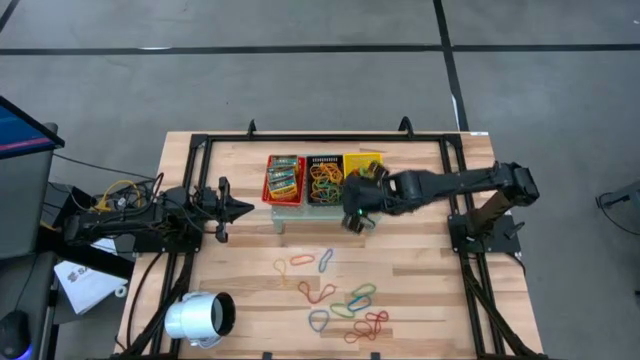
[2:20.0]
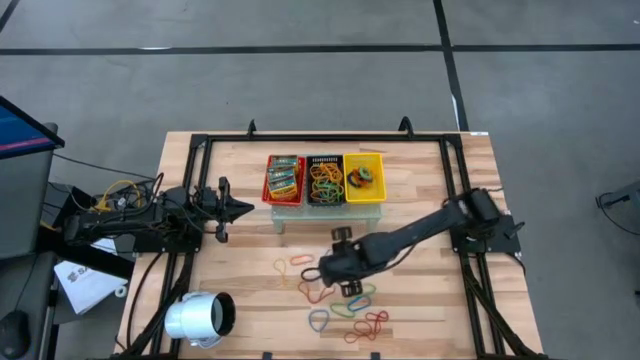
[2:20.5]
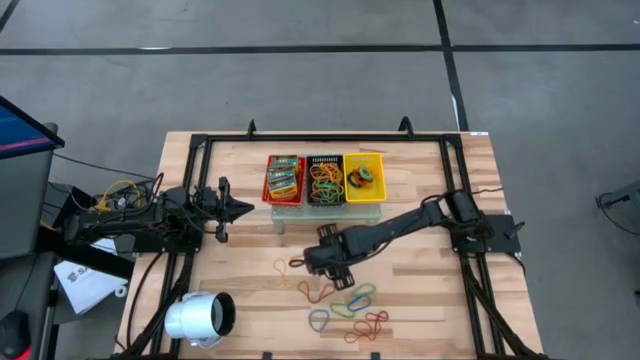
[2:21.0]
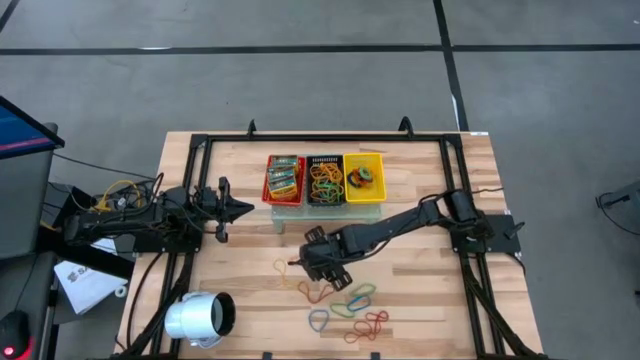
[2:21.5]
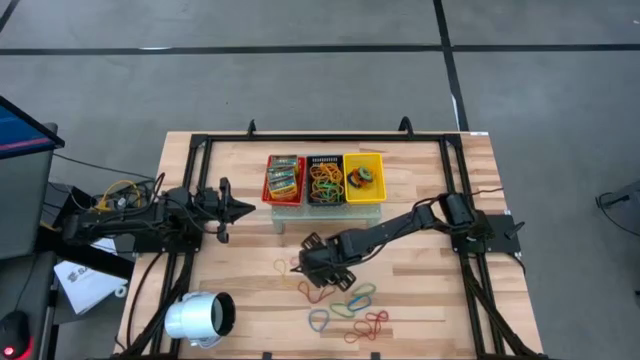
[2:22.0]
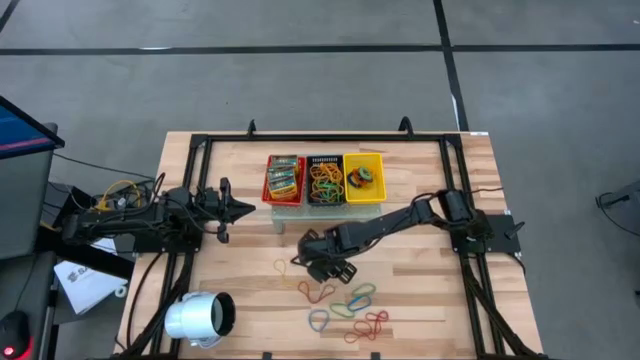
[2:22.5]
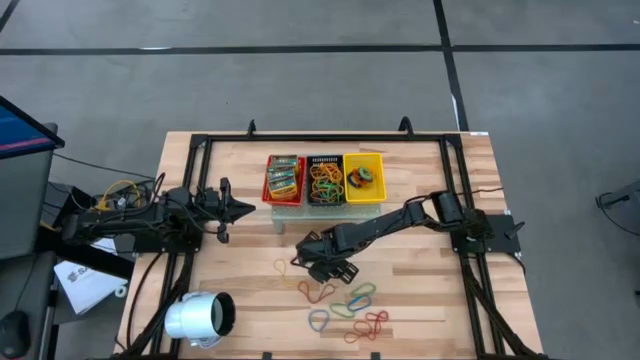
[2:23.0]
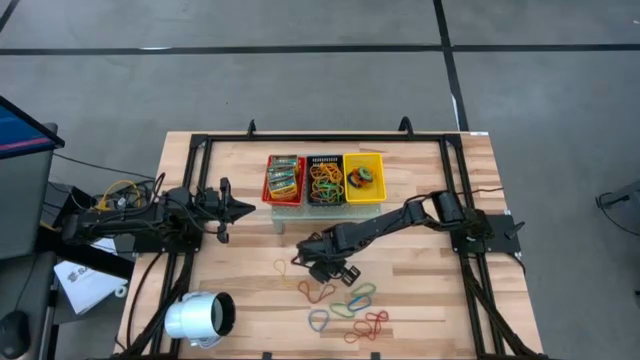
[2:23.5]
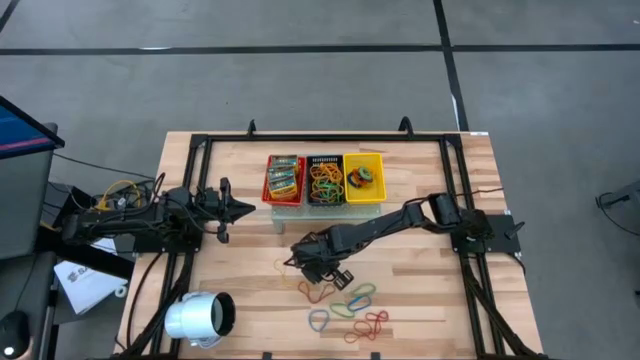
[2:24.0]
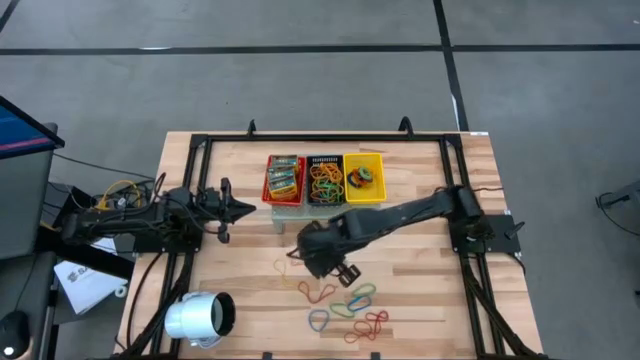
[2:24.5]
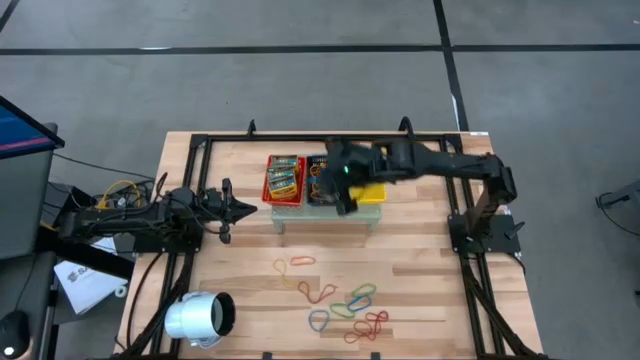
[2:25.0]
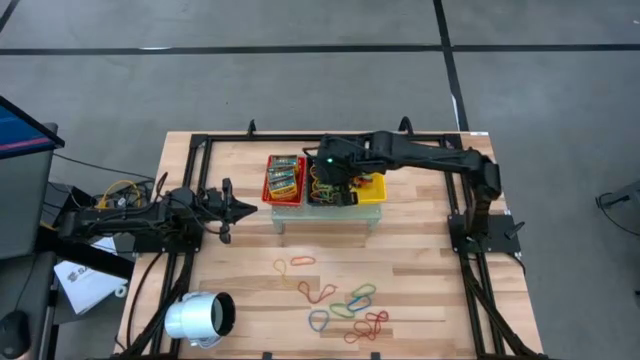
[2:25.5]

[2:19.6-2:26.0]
Task: Pick & Place Office Desk Supplies
Put the blue rubber band into the black bin on the shelf

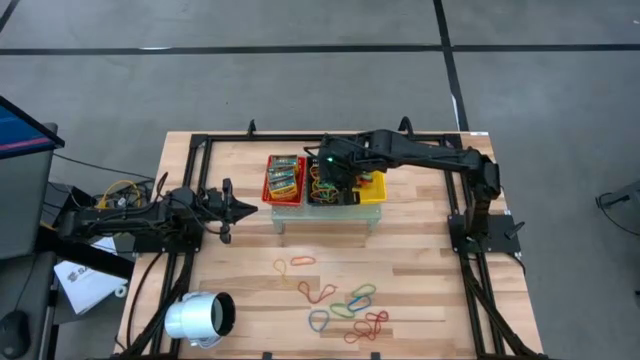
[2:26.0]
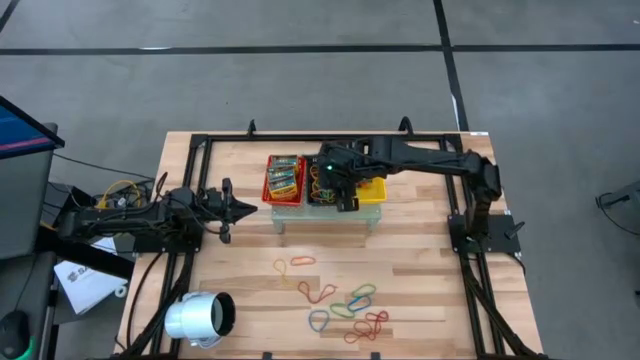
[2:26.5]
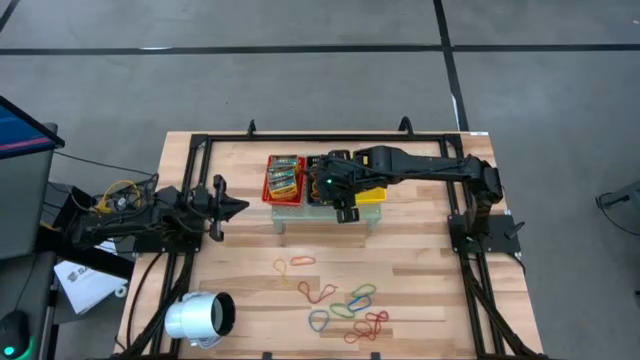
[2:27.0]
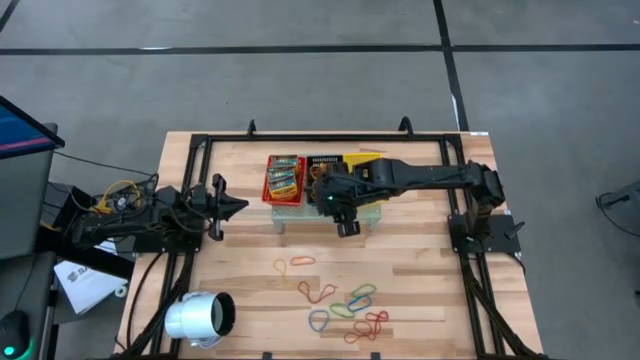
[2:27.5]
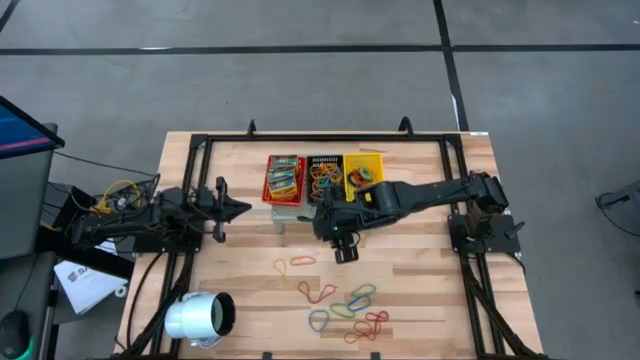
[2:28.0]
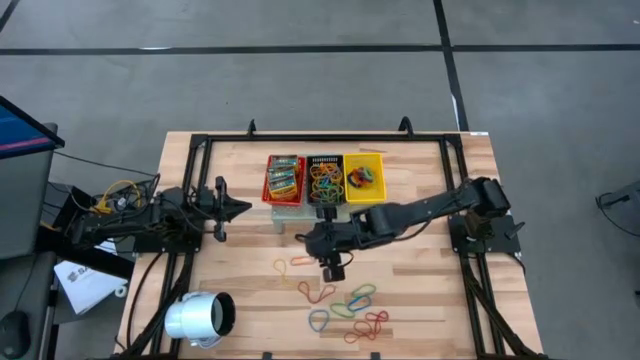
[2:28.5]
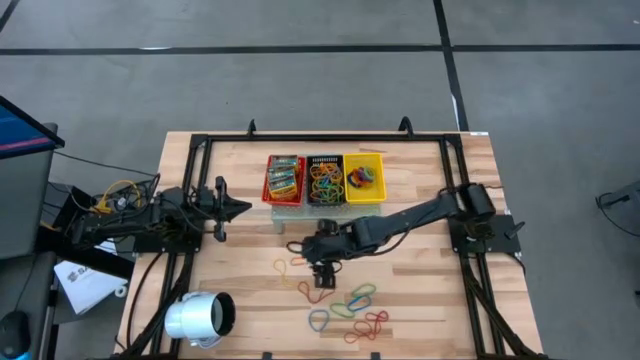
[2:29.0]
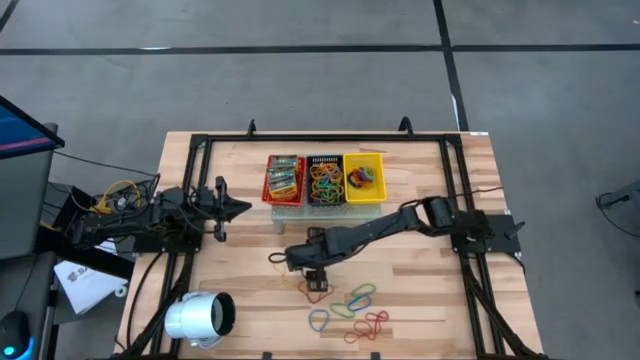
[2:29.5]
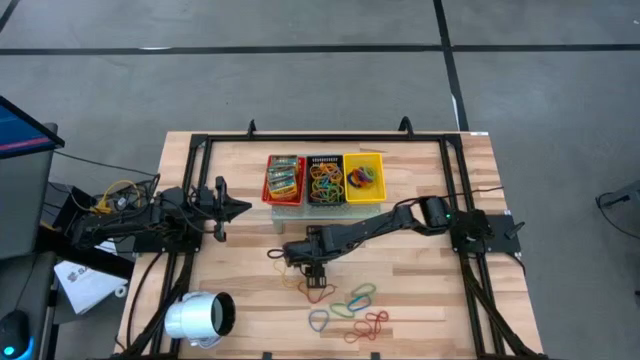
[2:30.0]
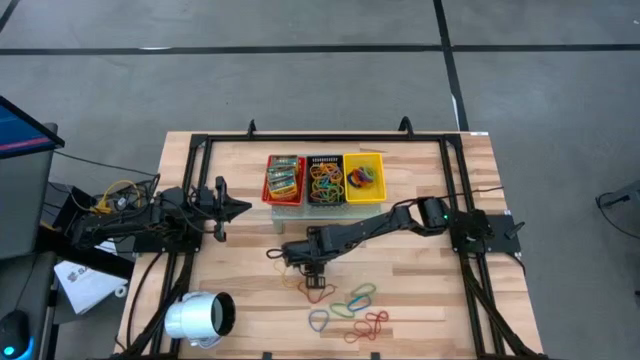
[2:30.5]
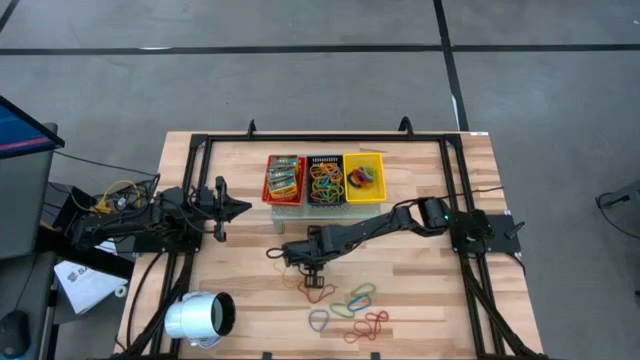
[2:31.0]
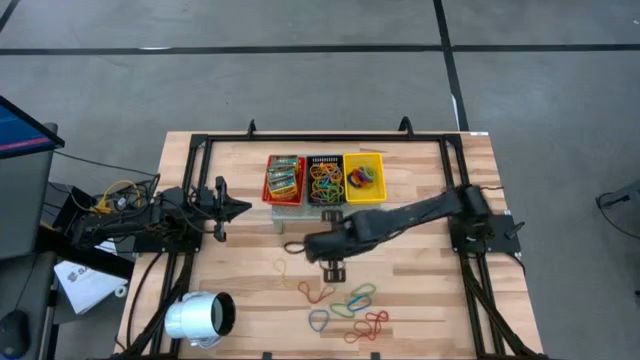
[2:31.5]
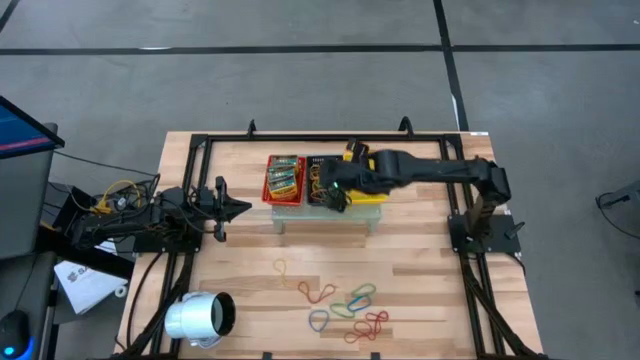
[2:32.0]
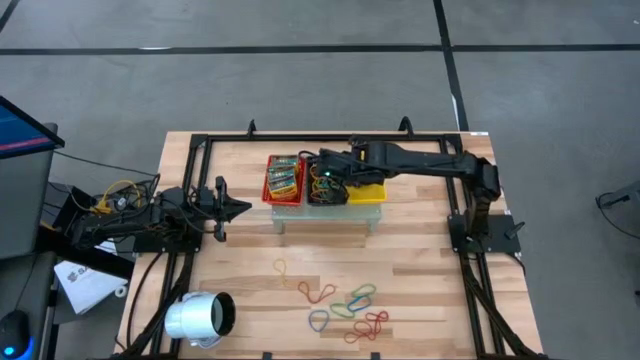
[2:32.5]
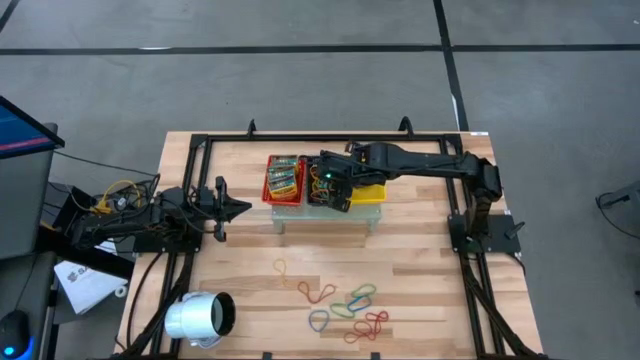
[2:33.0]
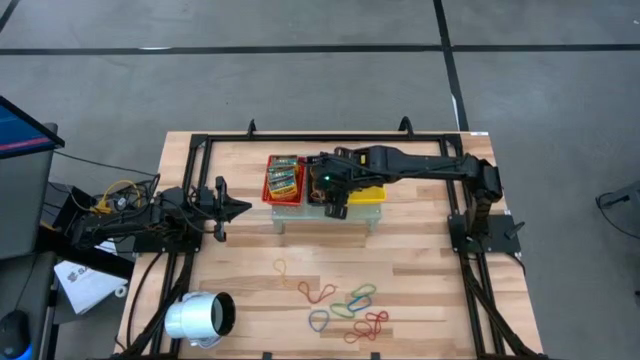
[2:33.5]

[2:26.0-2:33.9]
Put the orange rubber band into the black bin on the shelf

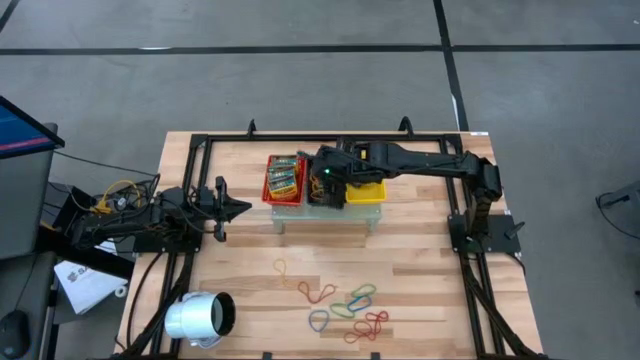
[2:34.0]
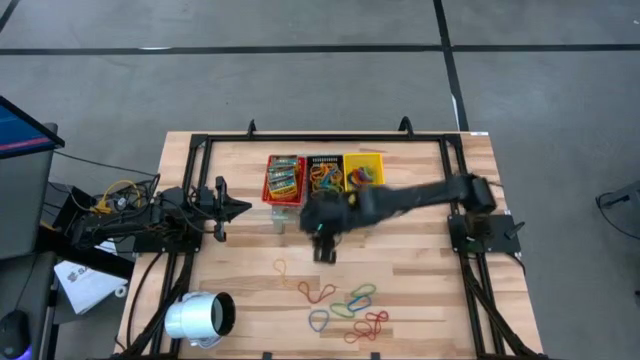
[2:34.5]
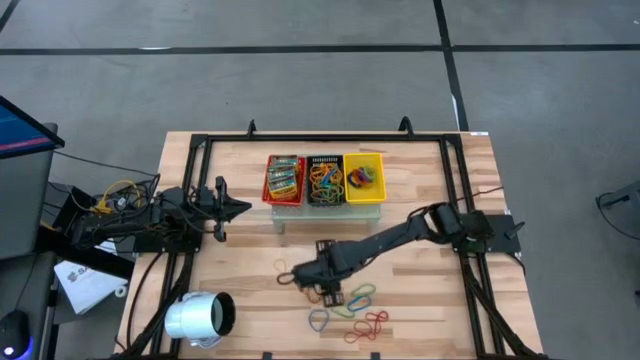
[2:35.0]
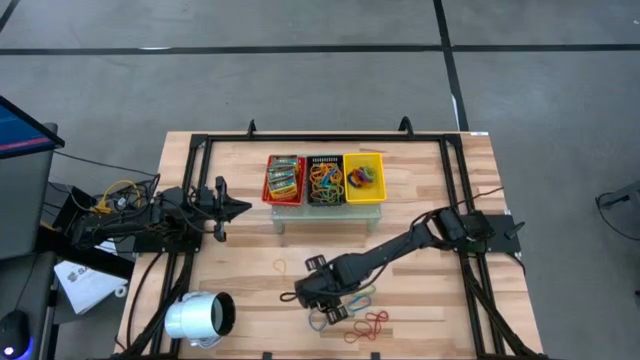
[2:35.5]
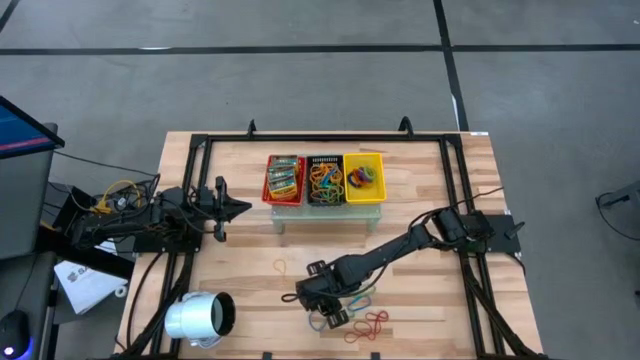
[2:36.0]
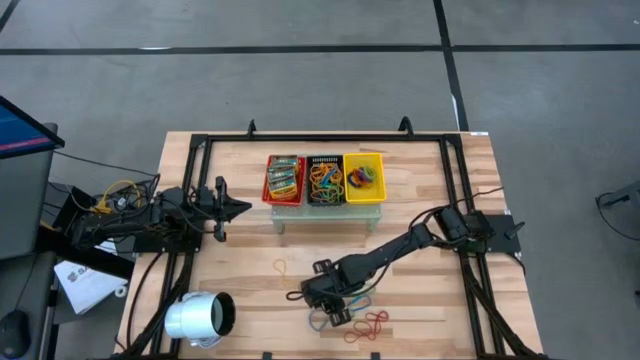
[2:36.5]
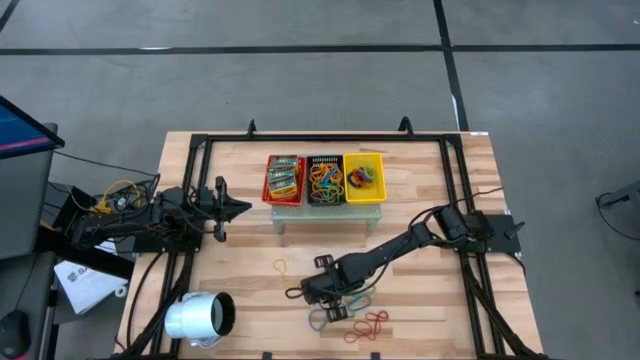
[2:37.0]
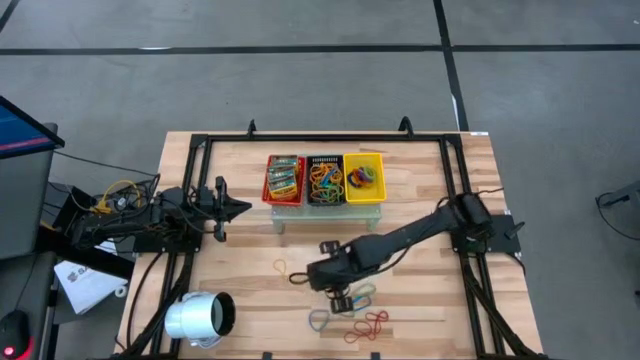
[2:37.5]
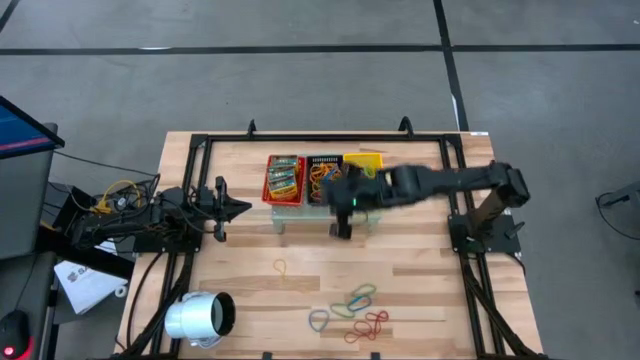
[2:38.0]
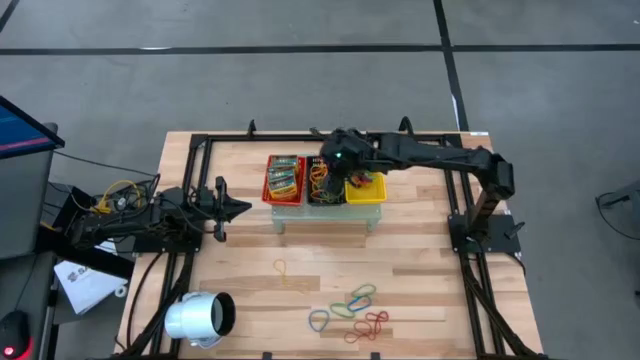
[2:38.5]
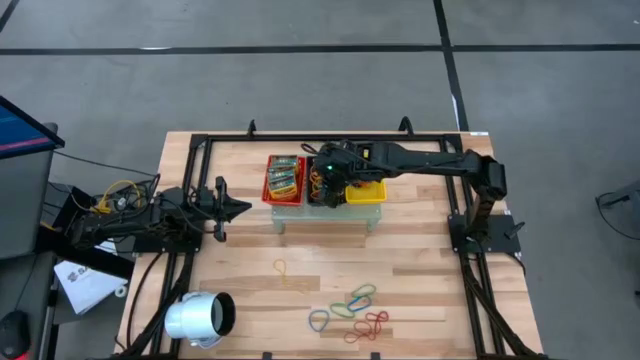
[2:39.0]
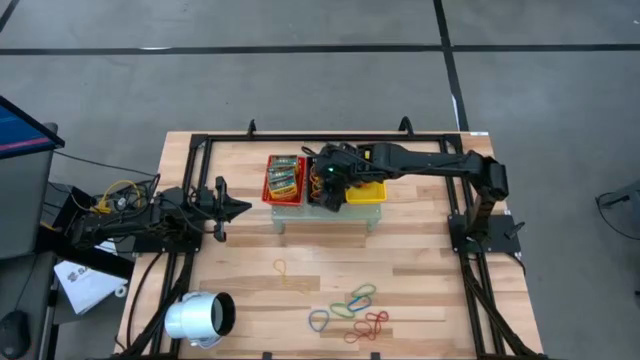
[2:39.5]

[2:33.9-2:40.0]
Put the red rubber band into the black bin on the shelf

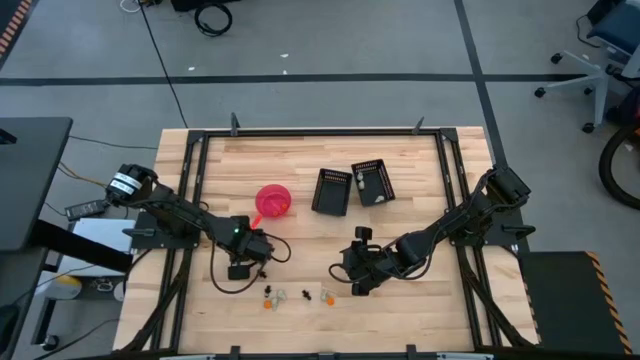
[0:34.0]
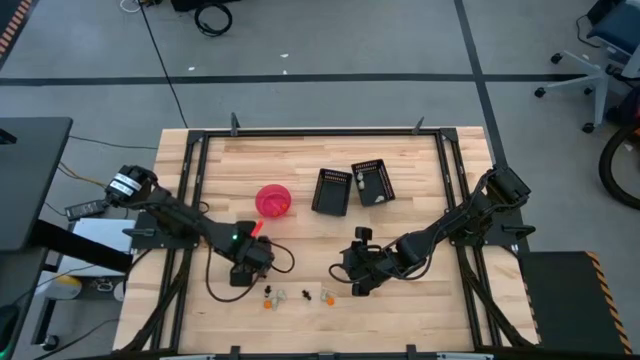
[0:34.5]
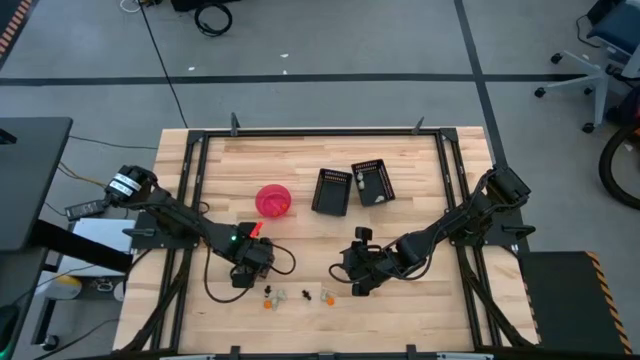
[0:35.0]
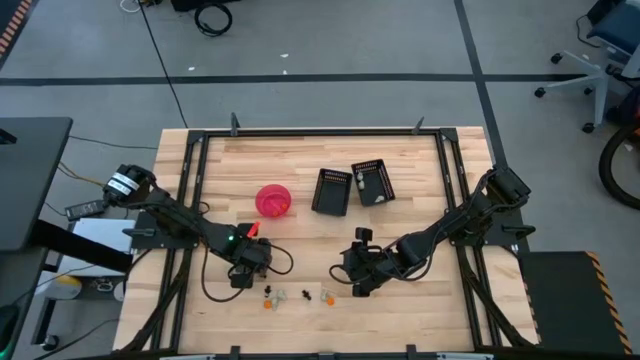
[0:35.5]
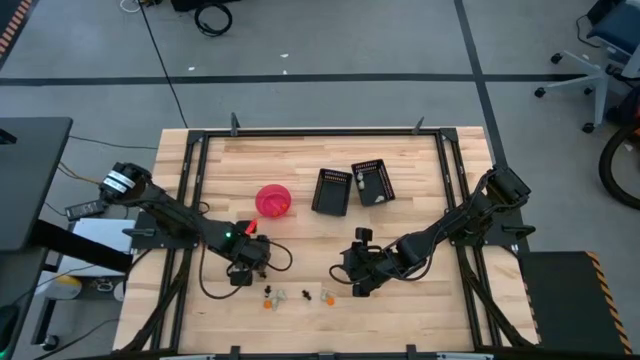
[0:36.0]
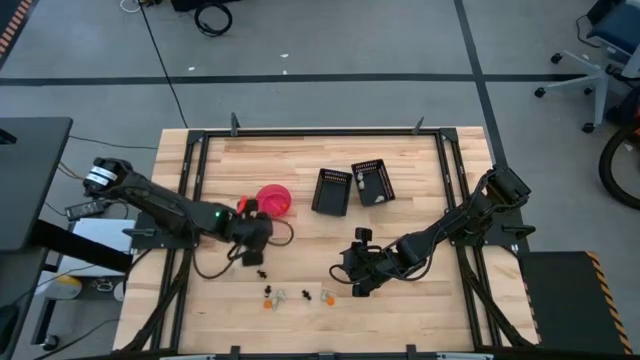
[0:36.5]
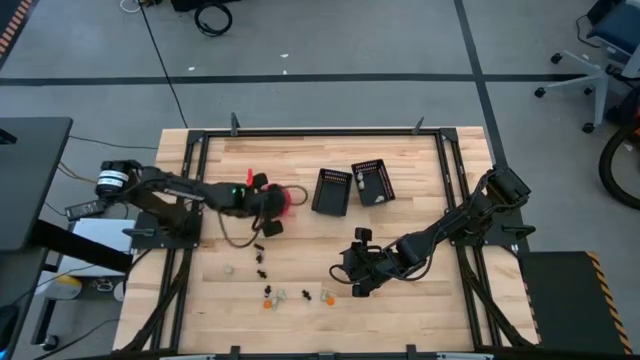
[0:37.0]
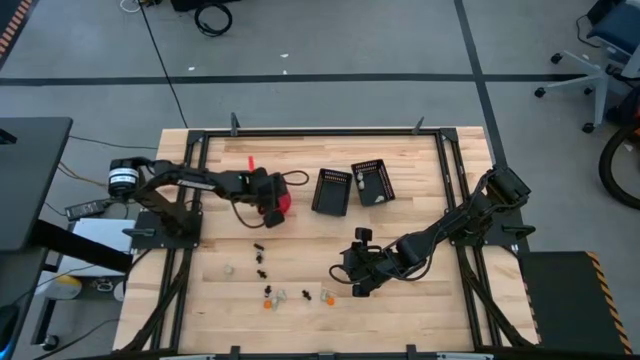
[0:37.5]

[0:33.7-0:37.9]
Task: Sort Halloween decoration
Put the orange pumpkin toy into the red bowl
